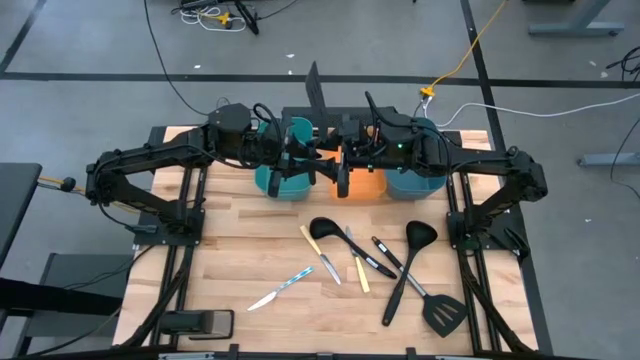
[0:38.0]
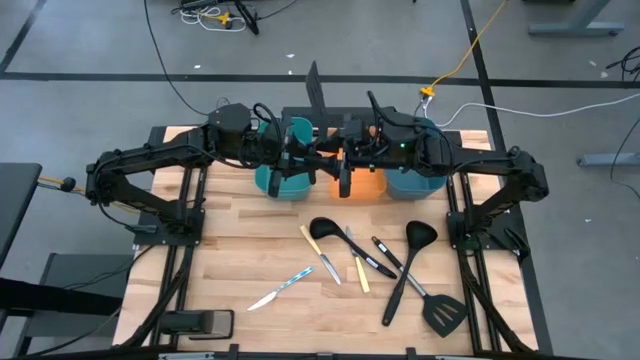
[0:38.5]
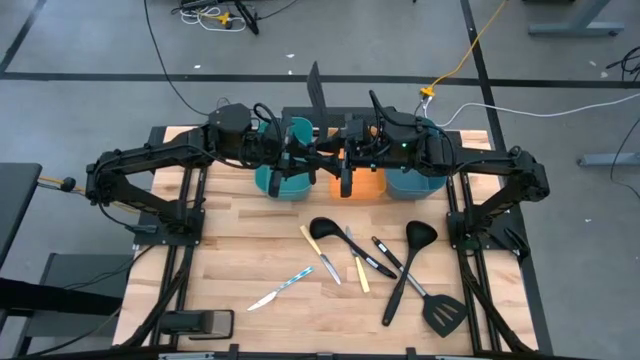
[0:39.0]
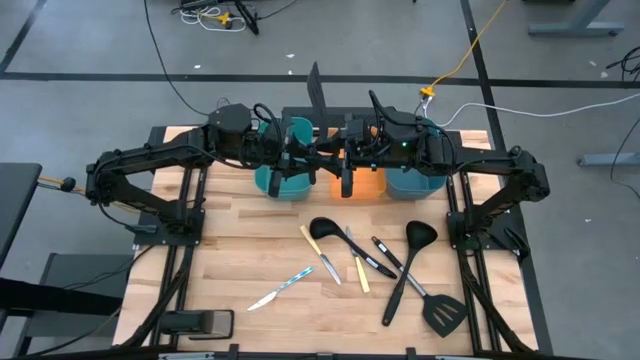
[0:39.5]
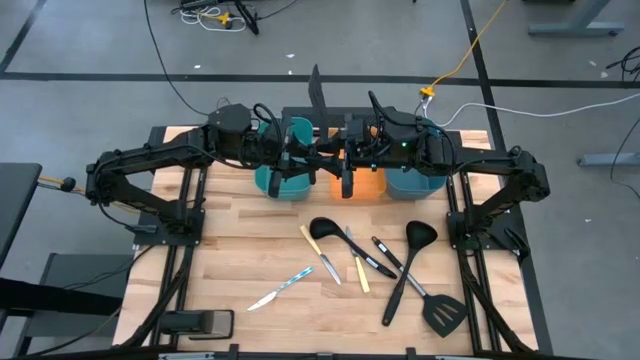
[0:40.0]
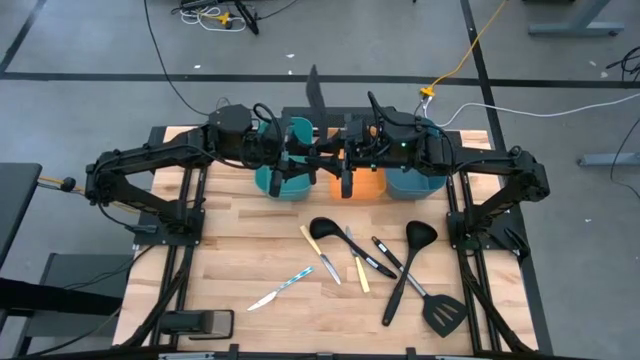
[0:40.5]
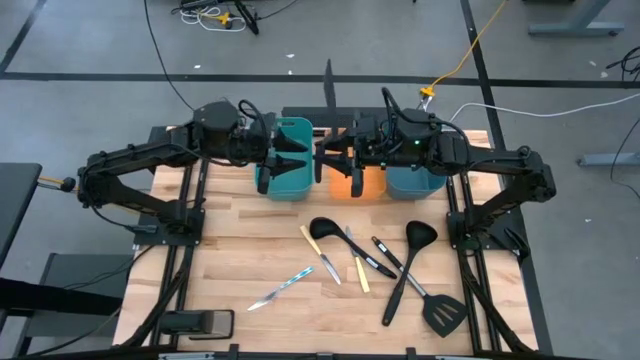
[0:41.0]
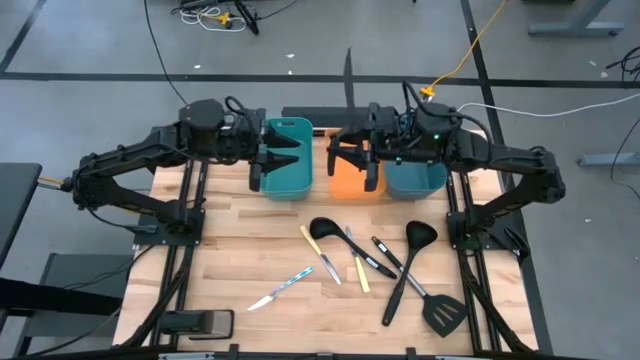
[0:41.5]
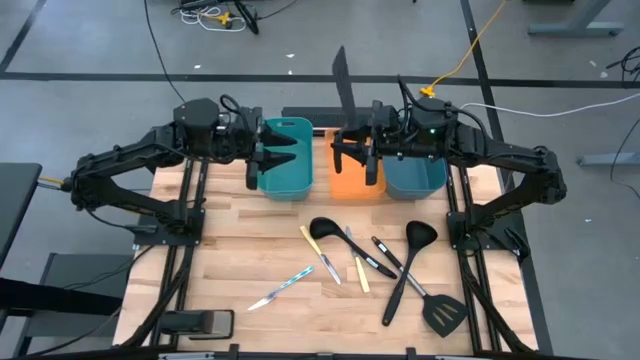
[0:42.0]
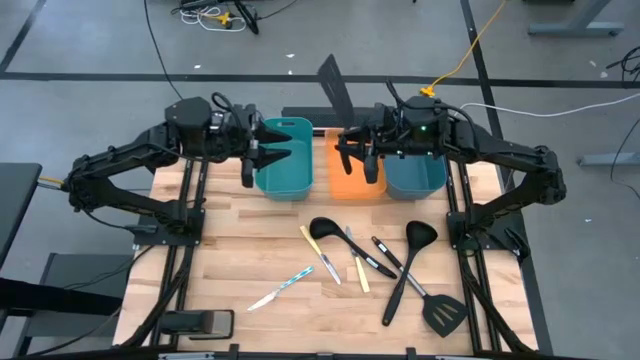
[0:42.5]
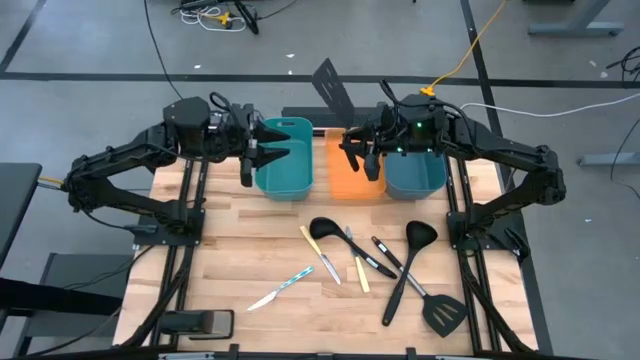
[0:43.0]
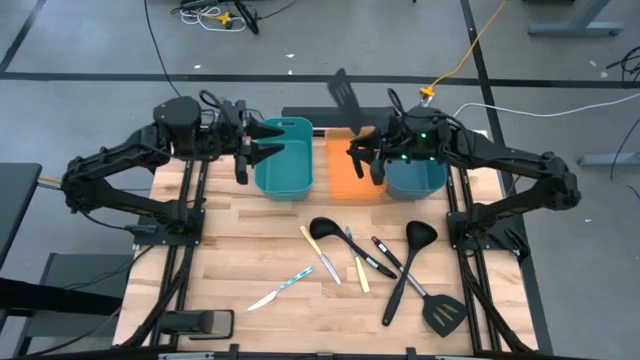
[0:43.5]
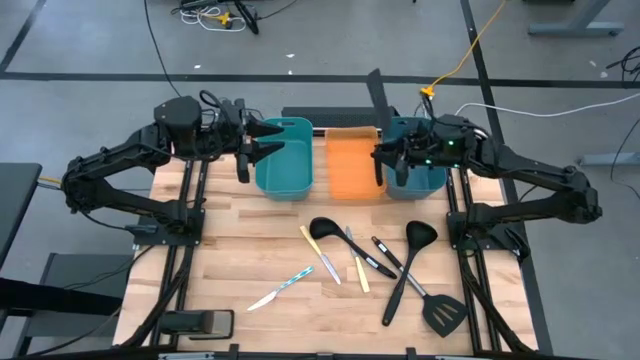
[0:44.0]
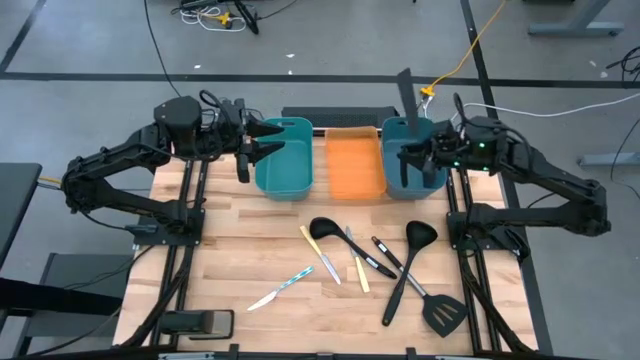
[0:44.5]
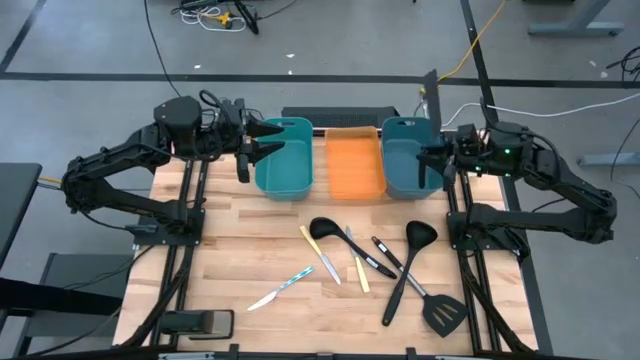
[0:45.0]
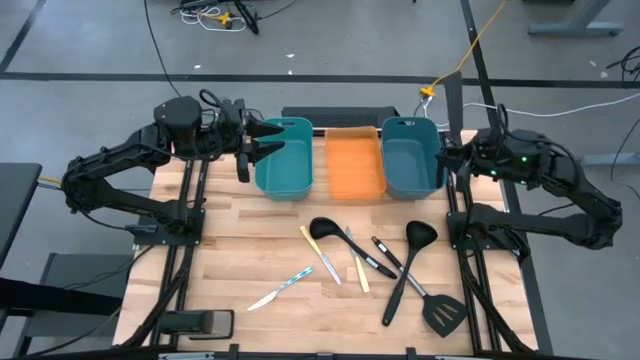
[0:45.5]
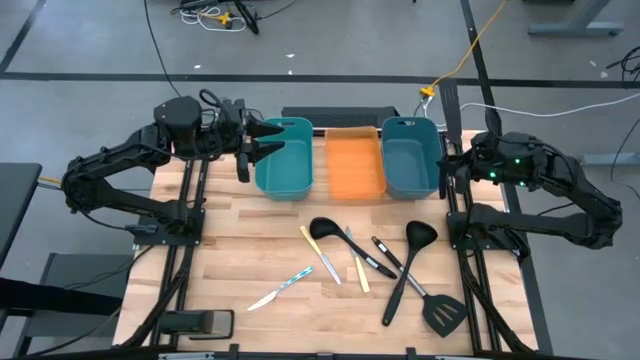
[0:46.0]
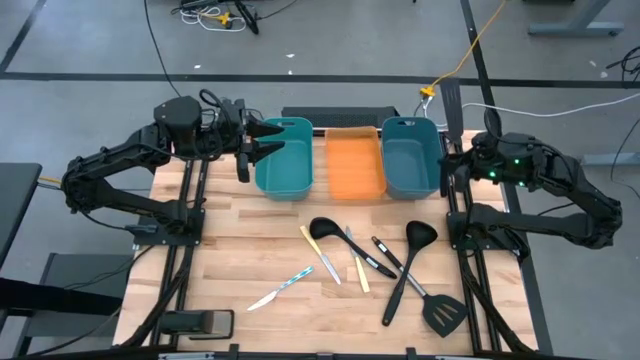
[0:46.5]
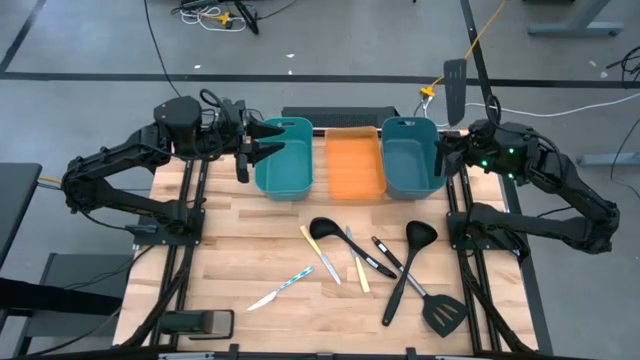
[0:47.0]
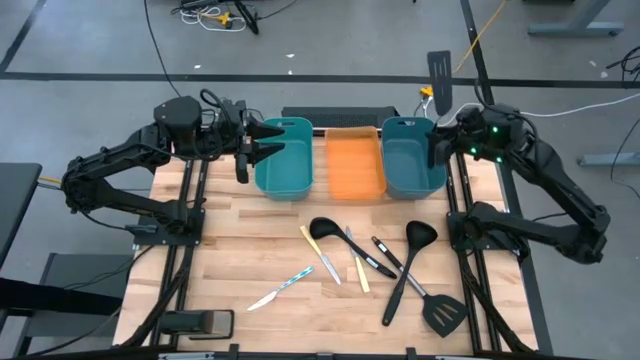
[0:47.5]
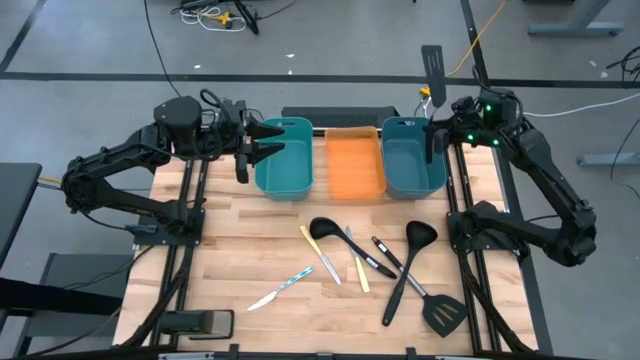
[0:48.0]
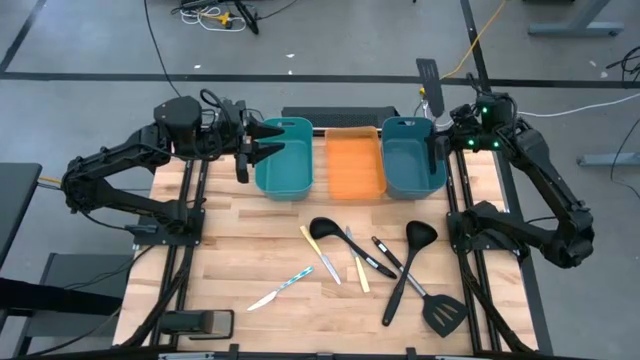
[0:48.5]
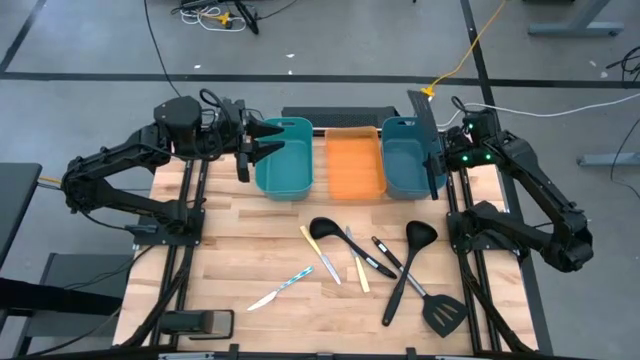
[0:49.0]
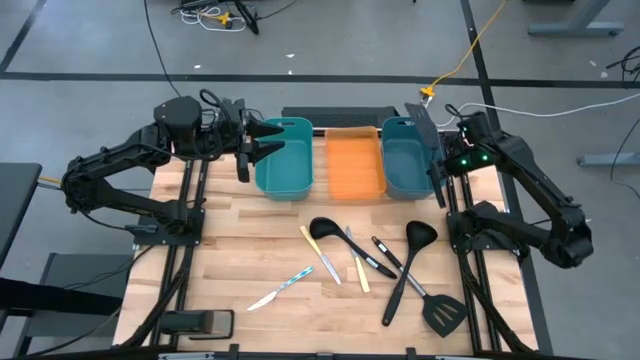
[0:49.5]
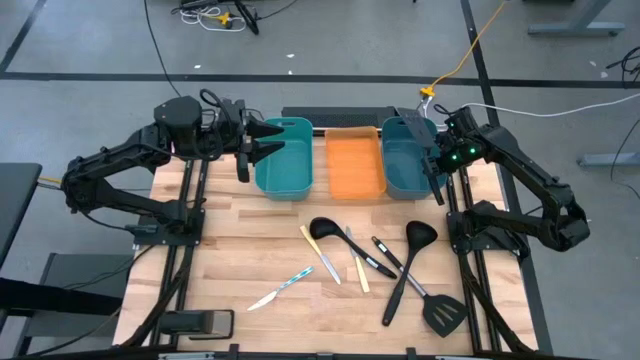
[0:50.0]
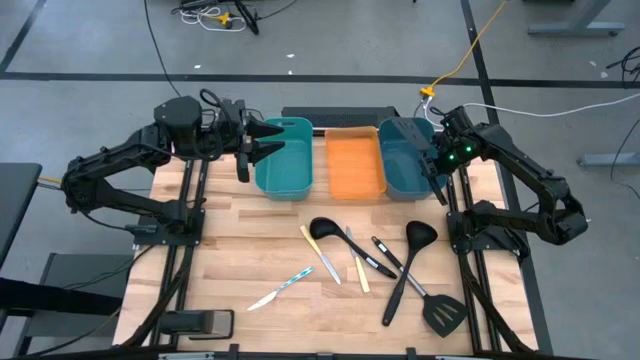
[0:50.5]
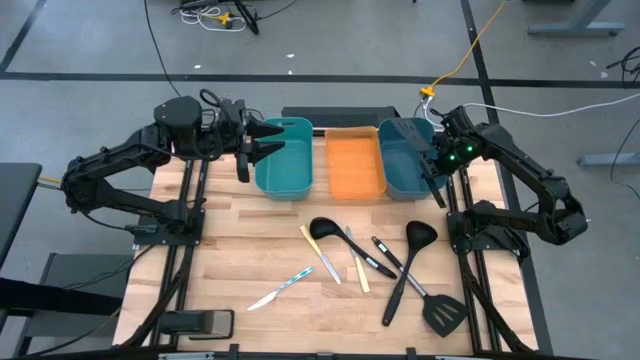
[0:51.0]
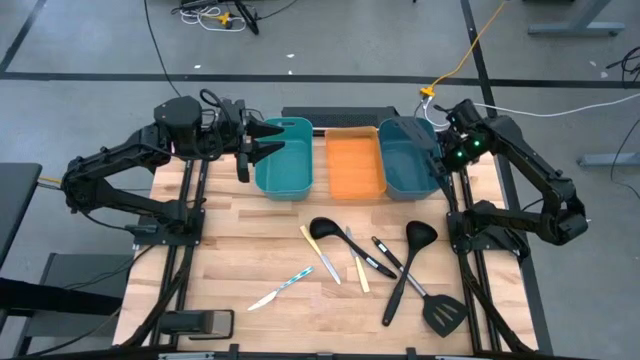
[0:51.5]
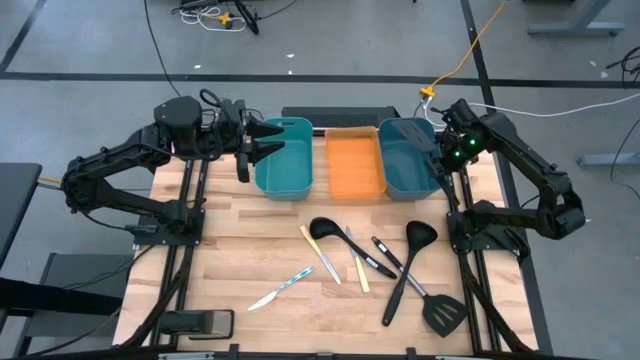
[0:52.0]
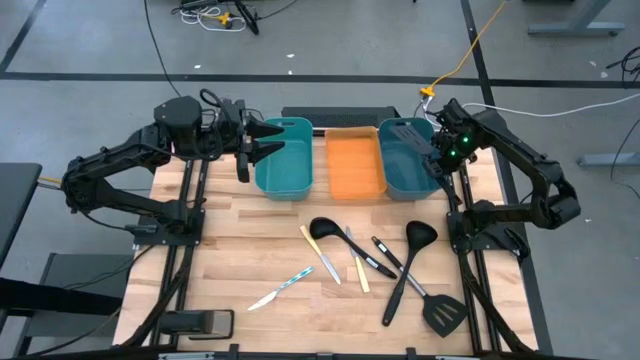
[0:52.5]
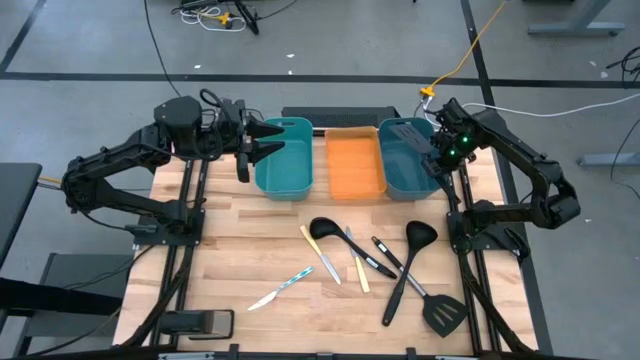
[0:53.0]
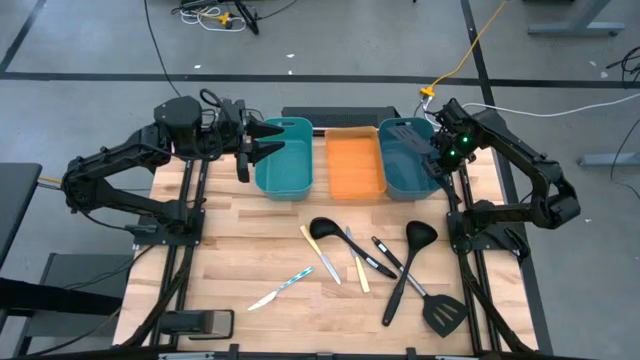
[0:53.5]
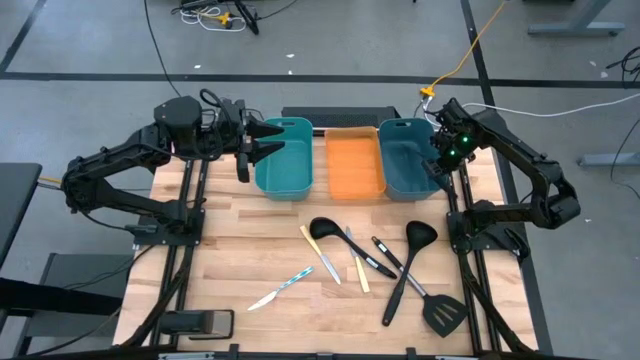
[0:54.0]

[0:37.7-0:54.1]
Task: Pick & Place Kitchen Items
Put the left black spatula into the blue bin
